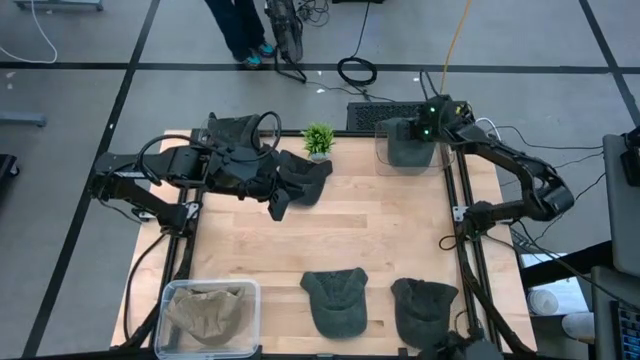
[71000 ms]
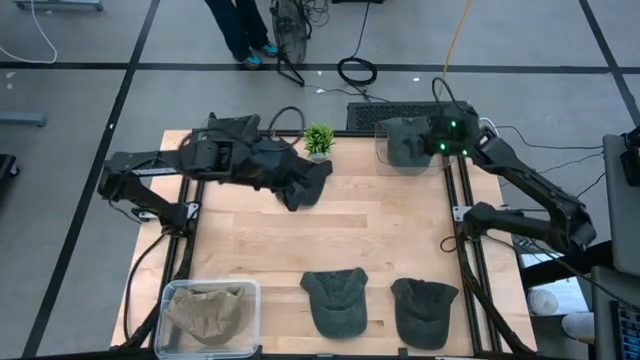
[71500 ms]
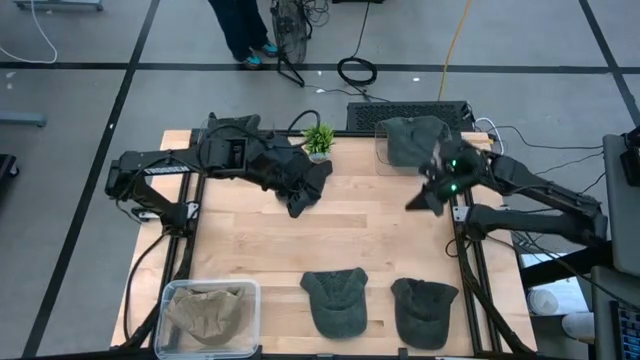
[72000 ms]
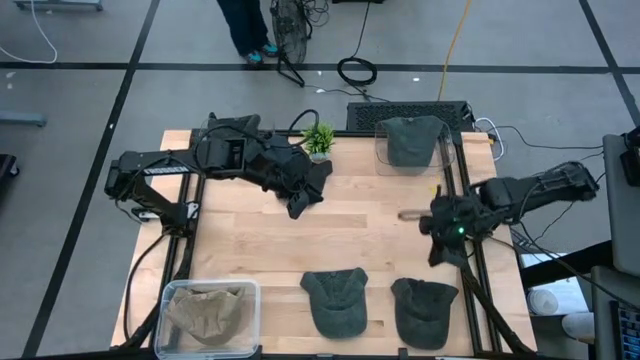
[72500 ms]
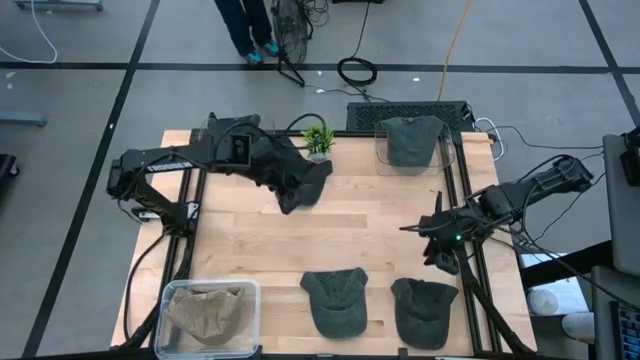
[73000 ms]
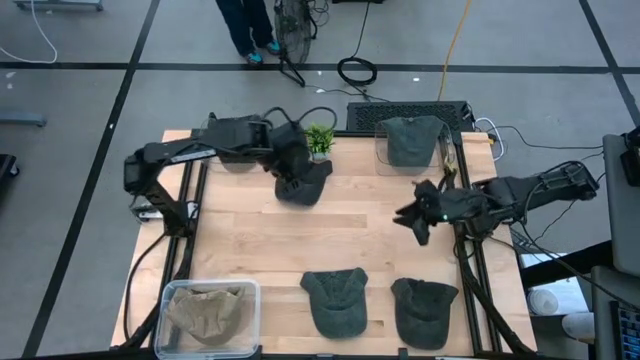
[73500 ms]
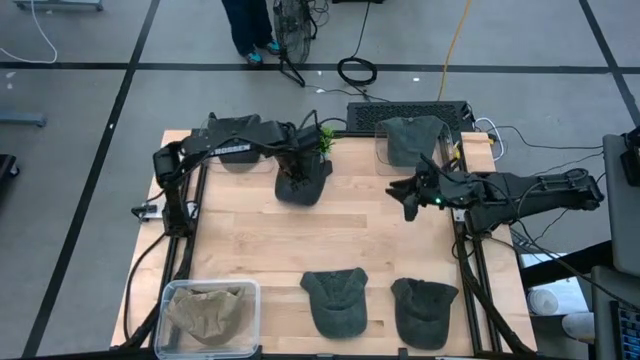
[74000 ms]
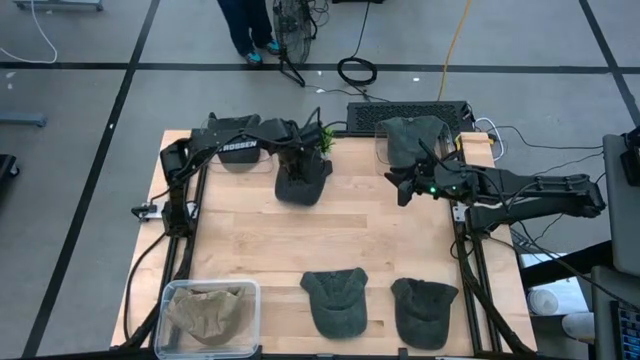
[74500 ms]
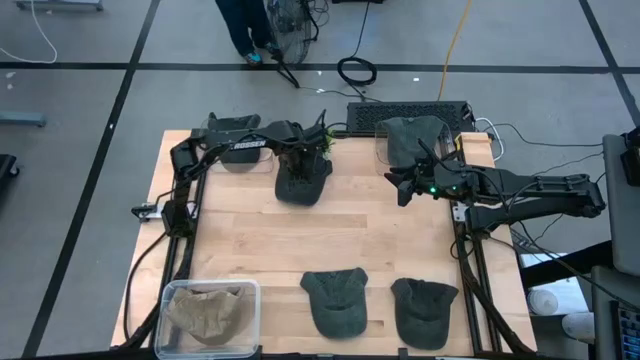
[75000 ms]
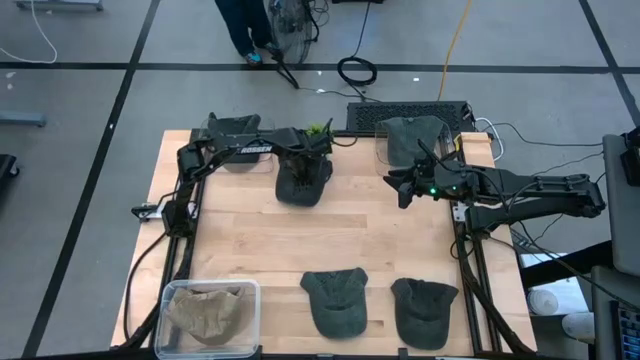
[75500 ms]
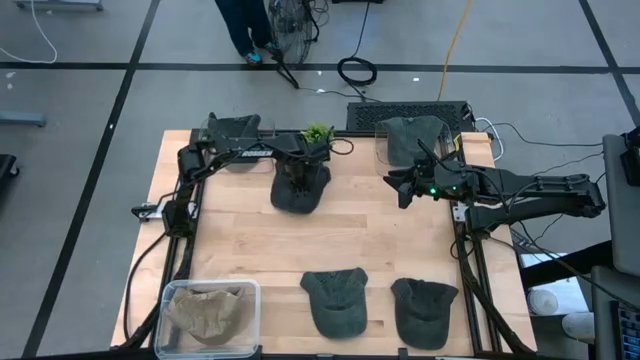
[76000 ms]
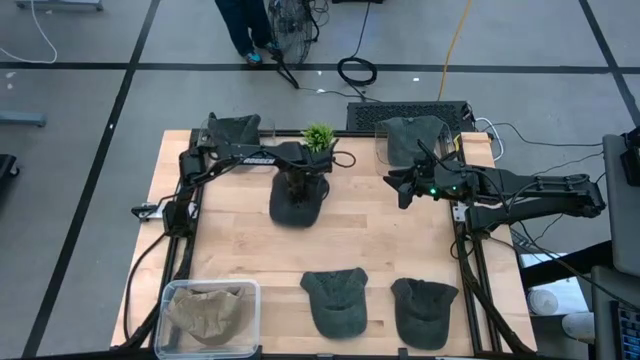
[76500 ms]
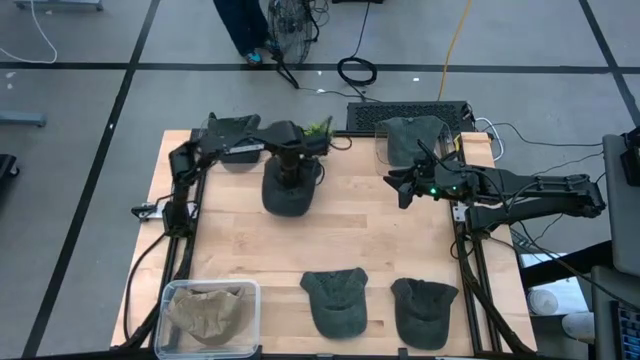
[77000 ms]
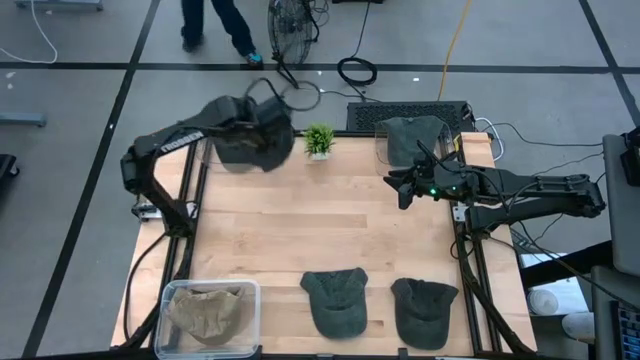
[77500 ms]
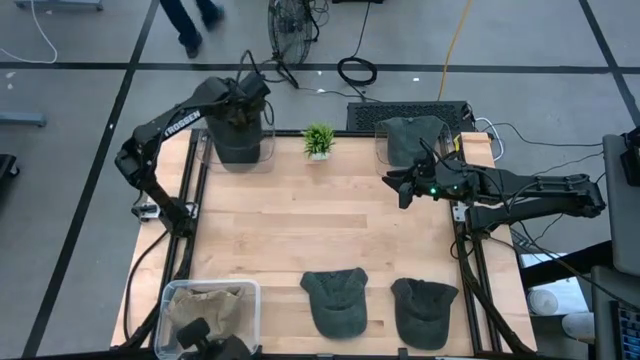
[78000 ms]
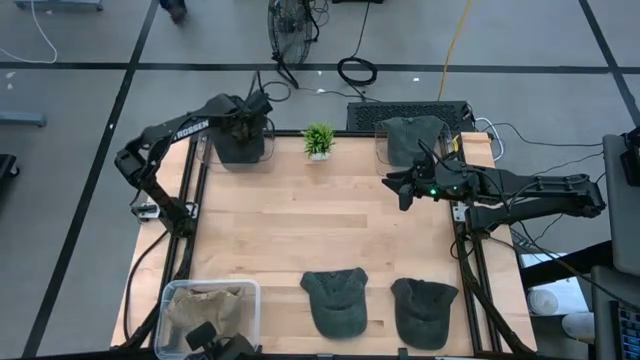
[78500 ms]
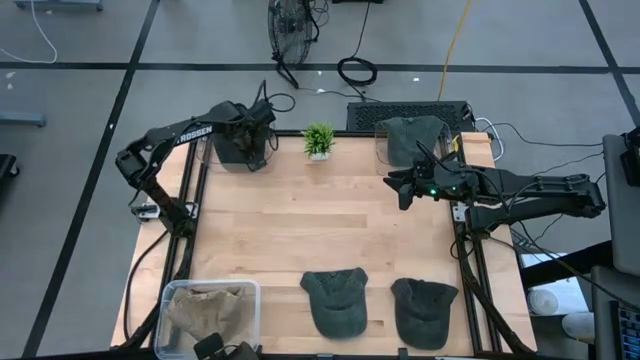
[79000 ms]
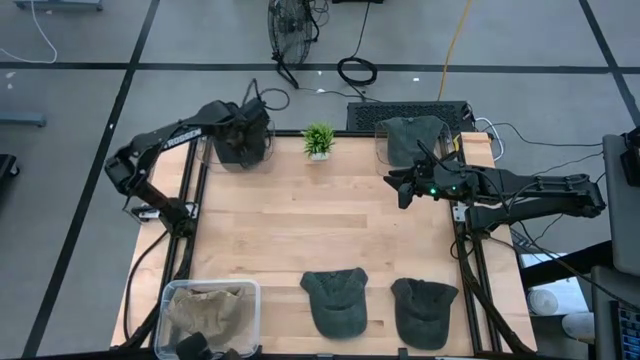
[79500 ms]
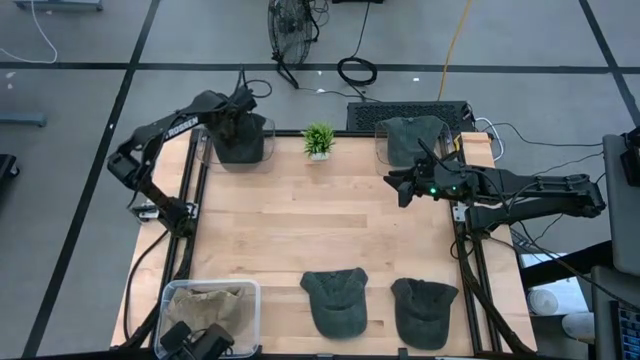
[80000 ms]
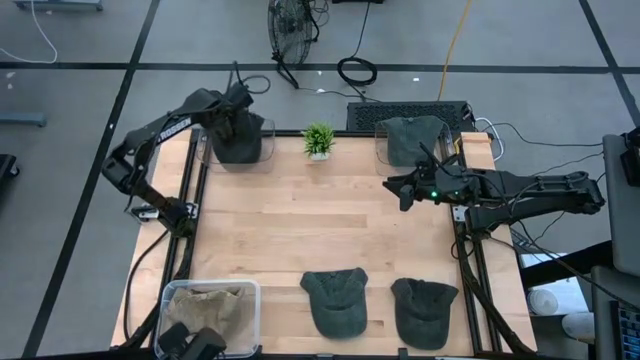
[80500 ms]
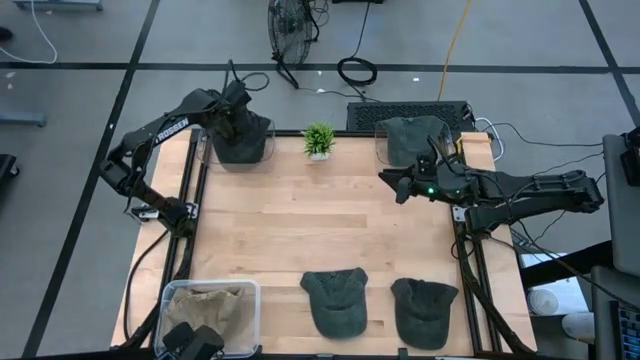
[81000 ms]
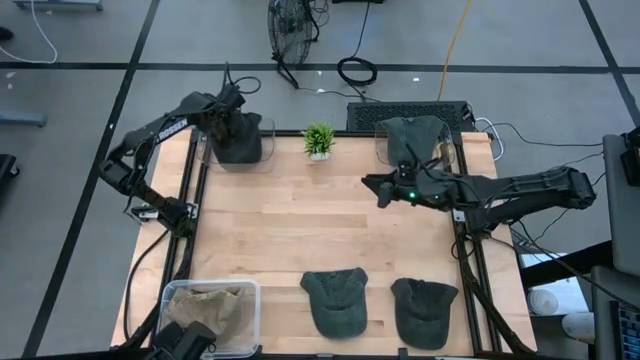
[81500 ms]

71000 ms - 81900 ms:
Task: Pick & Place hat
Put the top black cap into the left transparent bin

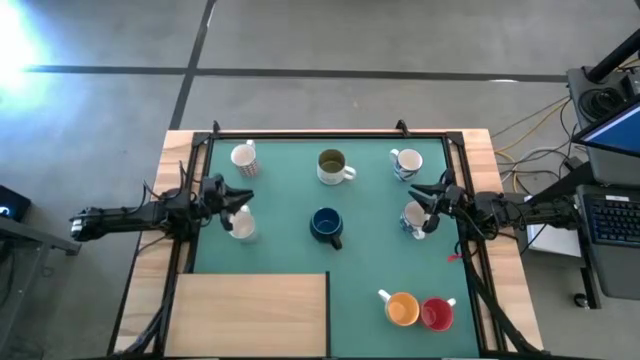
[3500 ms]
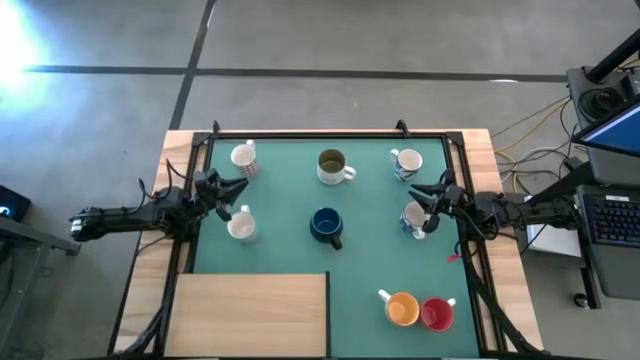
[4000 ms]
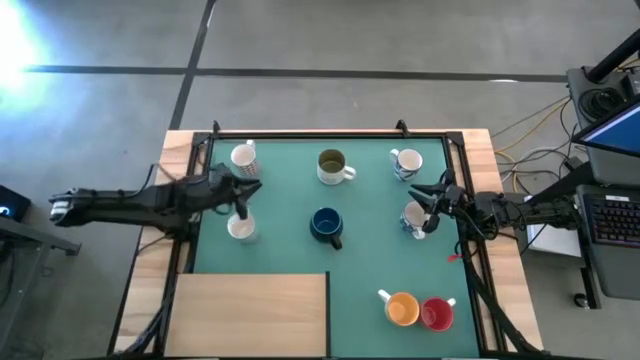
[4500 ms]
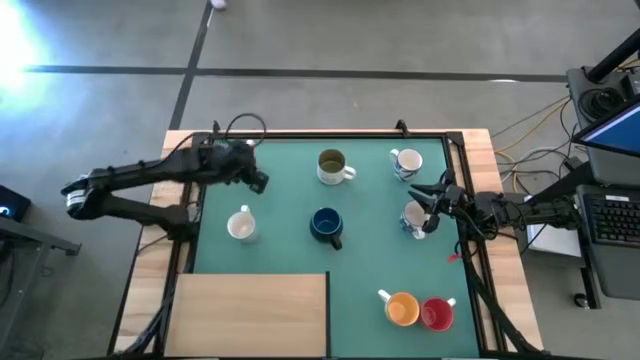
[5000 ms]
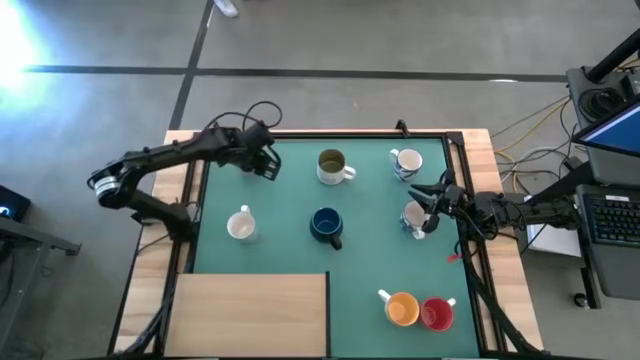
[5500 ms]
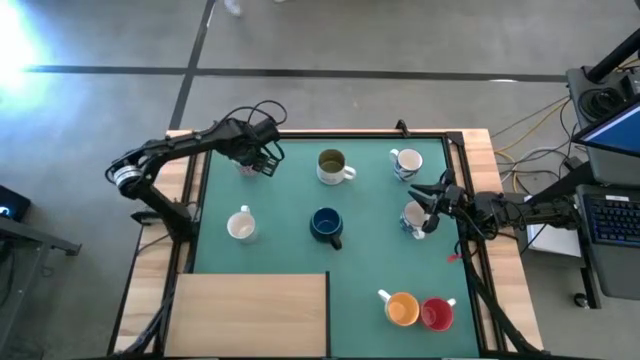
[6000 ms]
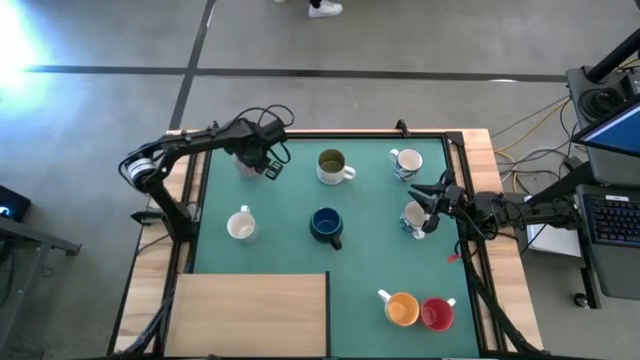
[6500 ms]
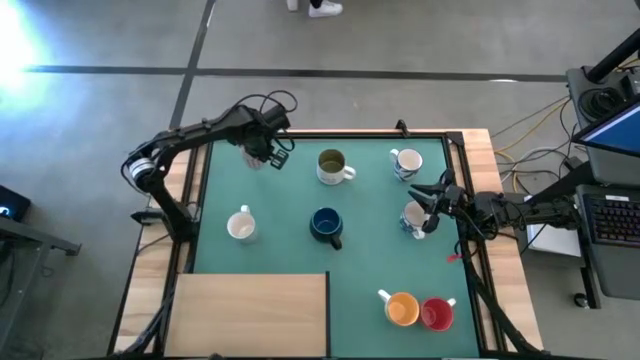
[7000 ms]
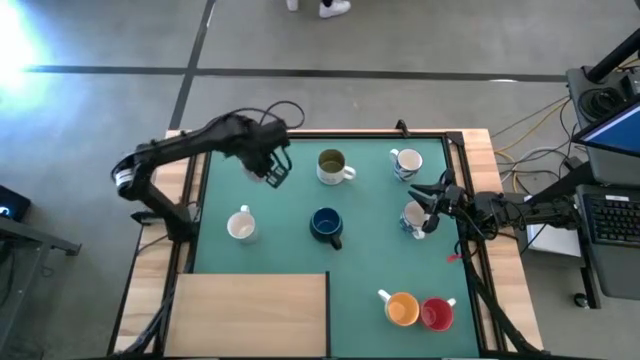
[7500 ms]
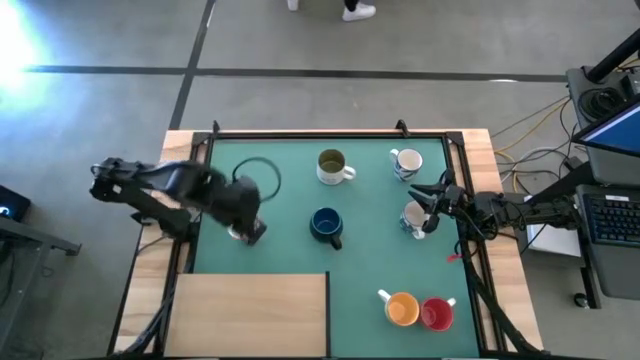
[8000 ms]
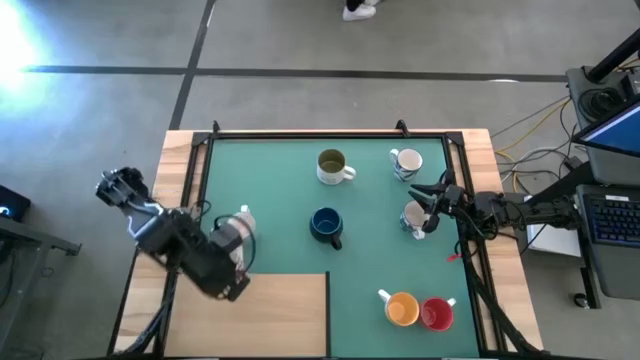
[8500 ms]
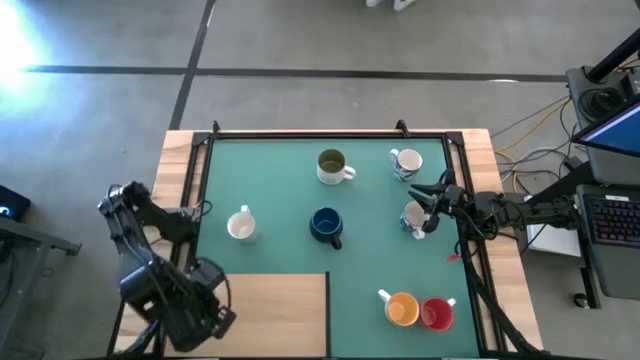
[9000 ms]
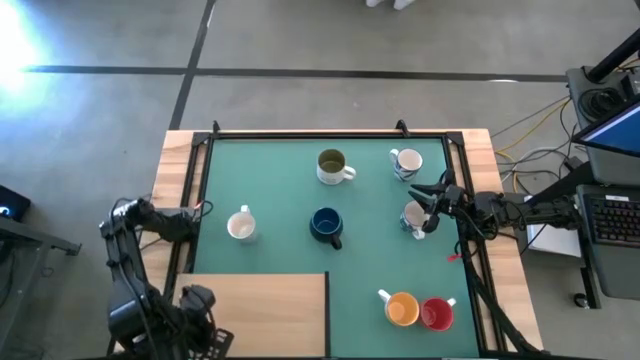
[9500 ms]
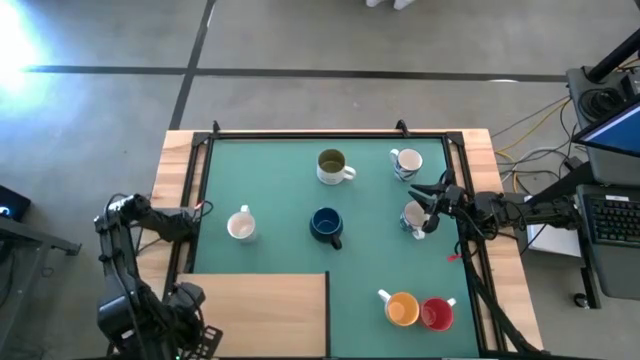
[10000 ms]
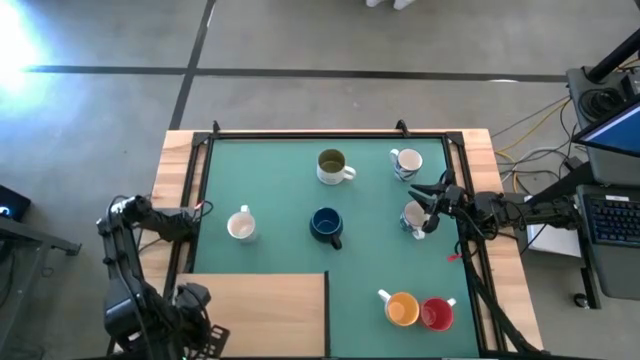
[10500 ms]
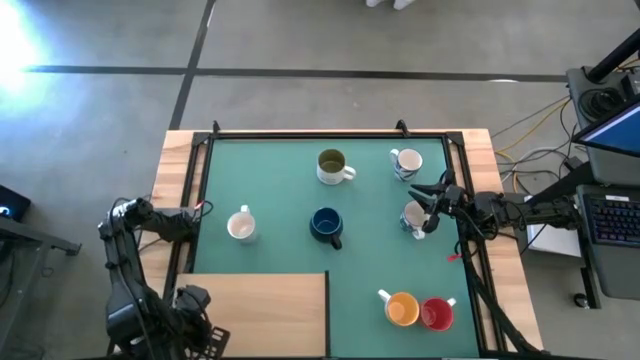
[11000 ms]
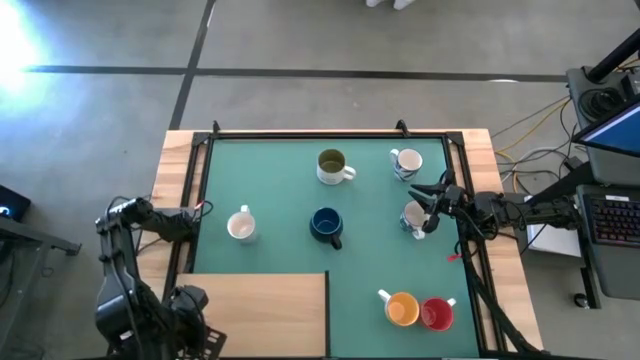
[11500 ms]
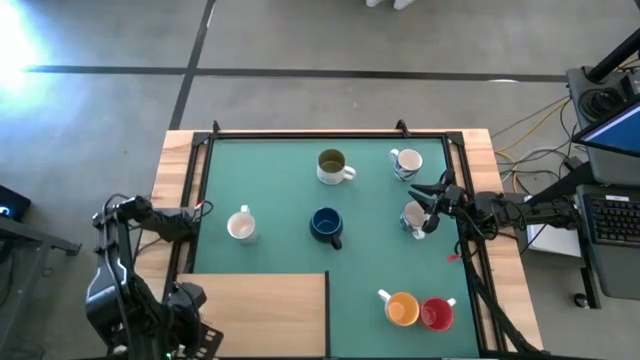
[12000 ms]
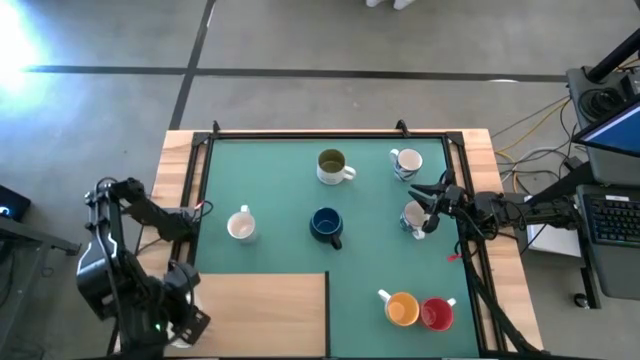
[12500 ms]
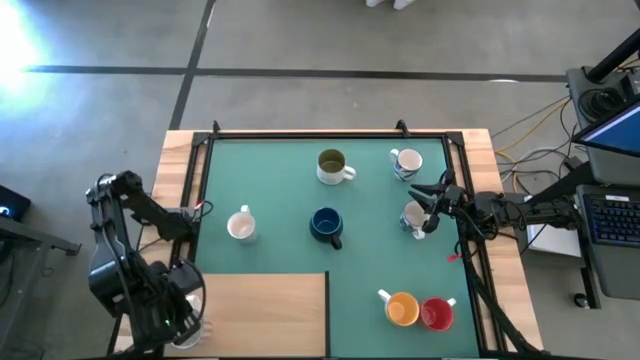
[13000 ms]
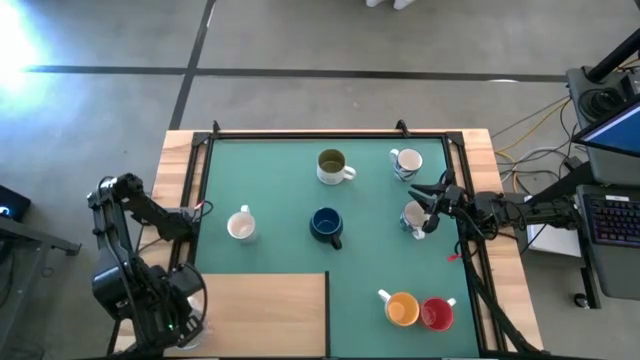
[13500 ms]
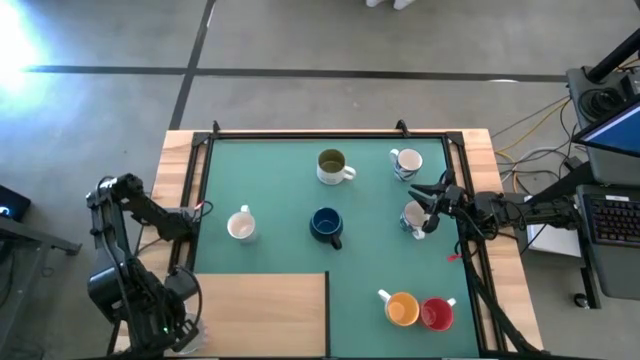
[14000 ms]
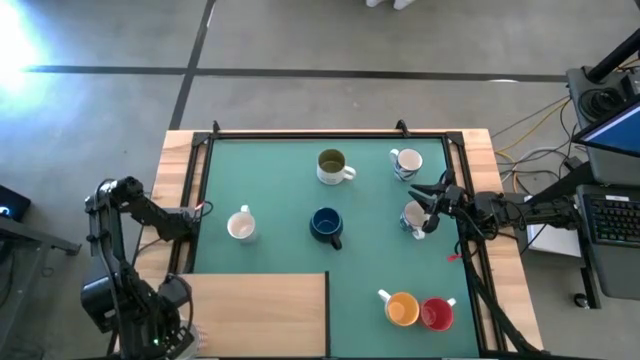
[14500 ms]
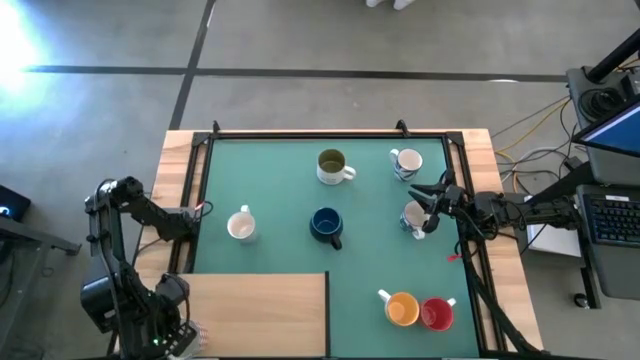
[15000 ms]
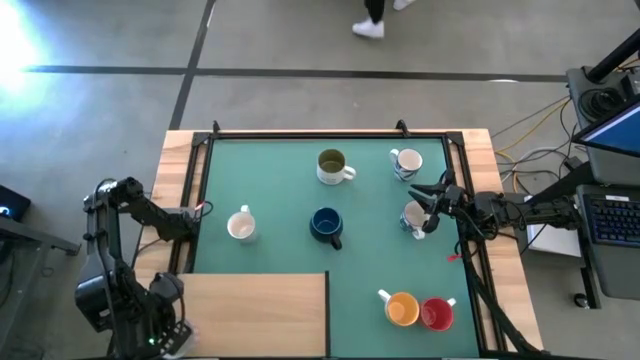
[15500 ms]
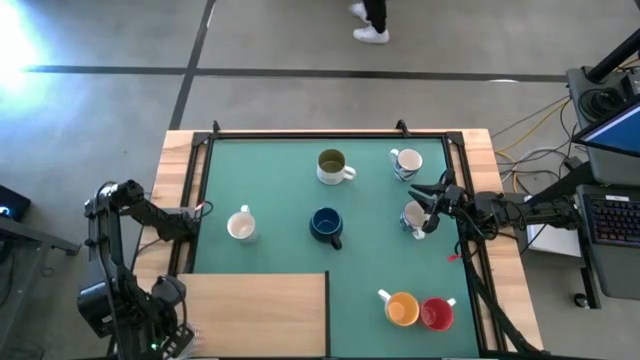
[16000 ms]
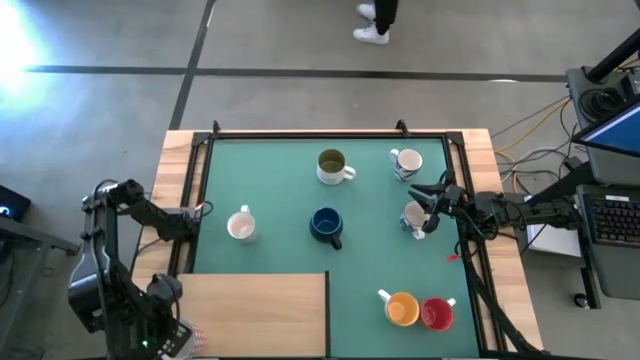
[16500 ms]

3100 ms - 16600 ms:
Task: Place coffee mugs
Put the red patterned mug on the shelf
